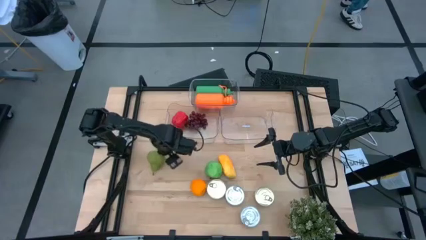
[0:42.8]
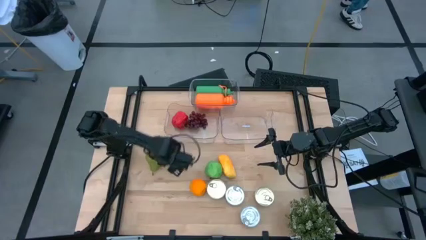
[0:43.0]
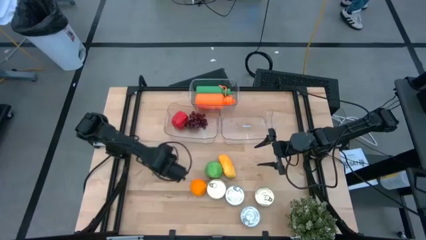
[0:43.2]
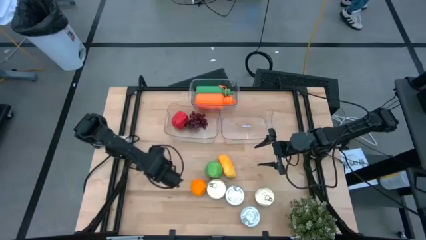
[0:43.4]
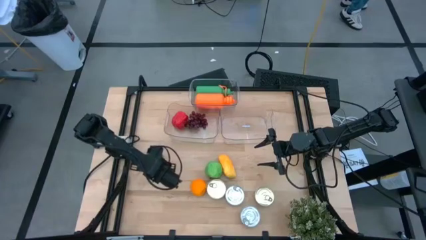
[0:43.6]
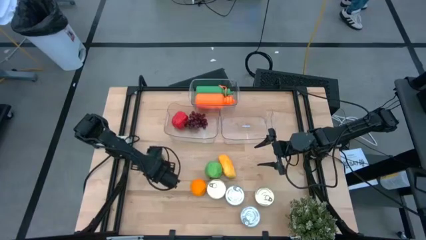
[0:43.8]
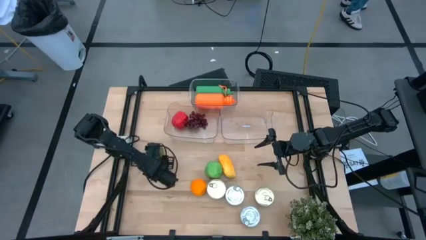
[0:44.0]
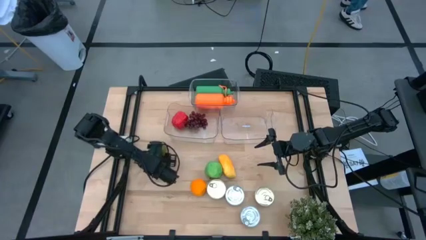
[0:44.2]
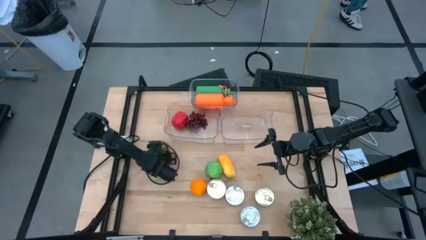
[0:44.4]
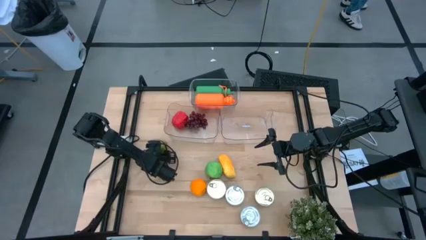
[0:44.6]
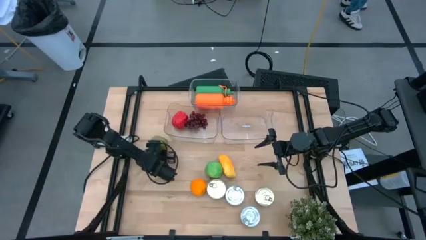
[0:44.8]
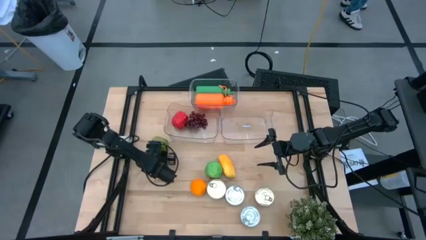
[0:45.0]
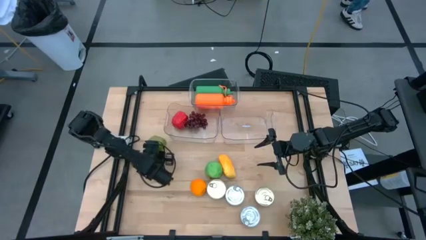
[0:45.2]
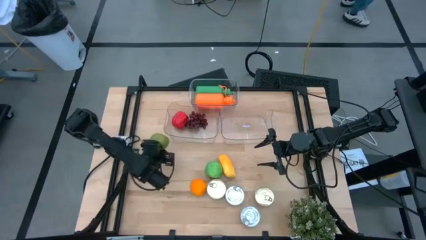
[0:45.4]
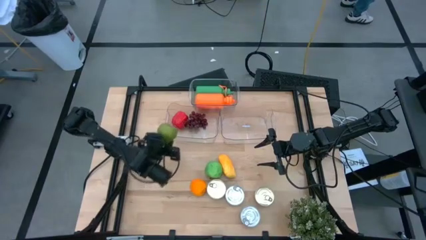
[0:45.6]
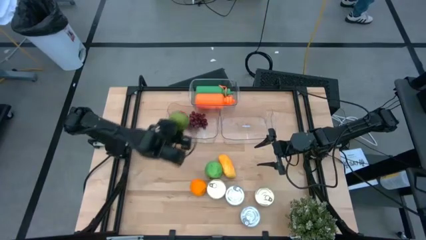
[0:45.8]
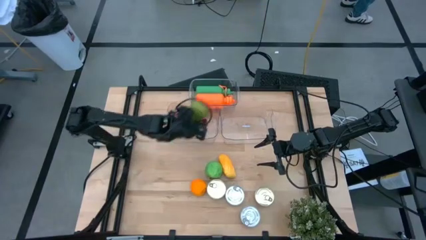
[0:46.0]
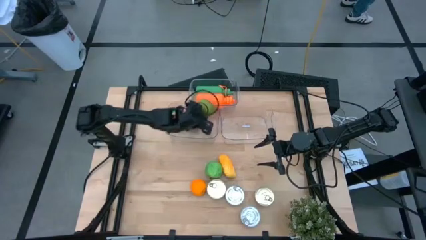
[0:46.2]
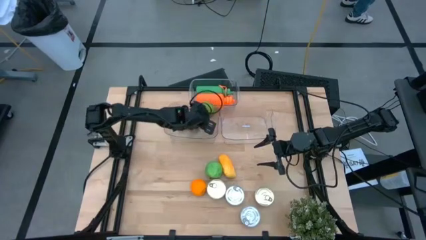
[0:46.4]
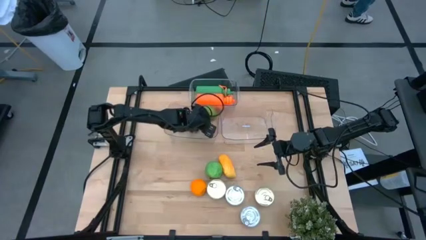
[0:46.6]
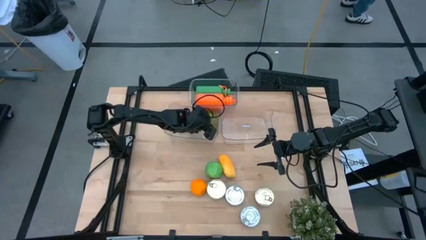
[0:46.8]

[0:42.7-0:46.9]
Task: Pick & Place Food Item
Put the green pear into the bottom left transparent bin

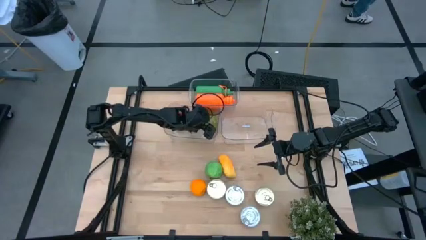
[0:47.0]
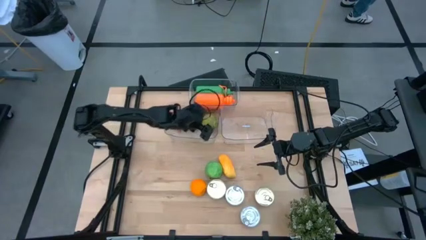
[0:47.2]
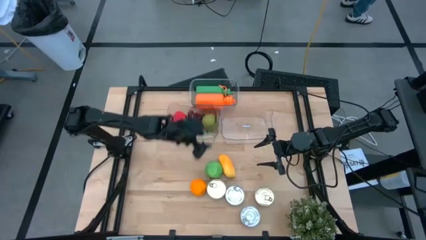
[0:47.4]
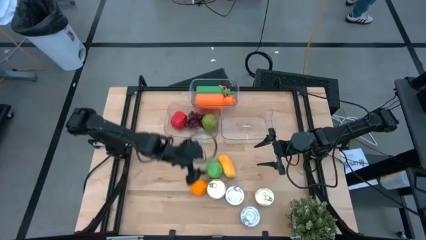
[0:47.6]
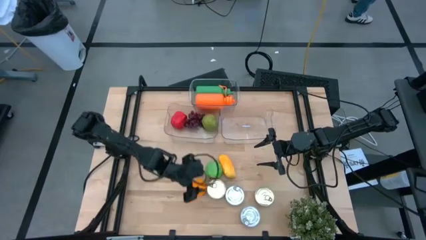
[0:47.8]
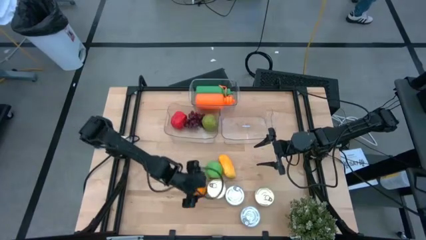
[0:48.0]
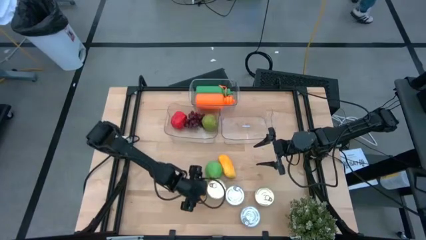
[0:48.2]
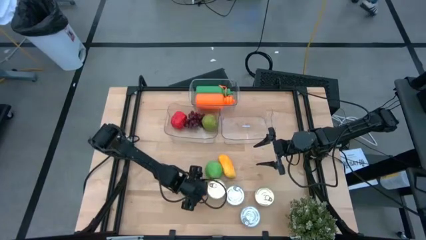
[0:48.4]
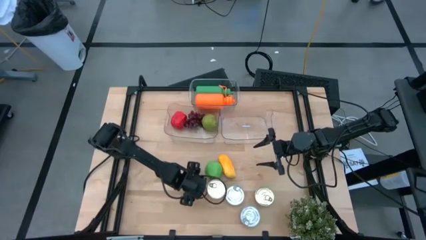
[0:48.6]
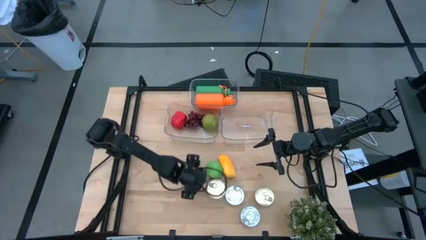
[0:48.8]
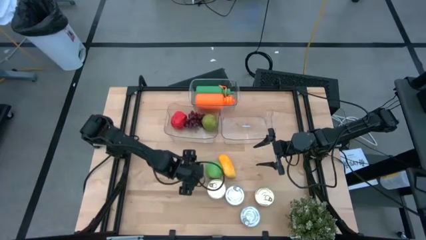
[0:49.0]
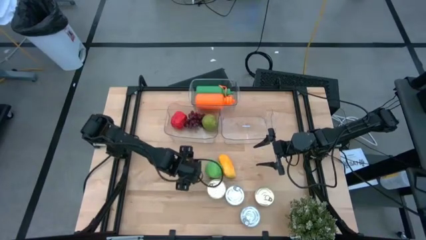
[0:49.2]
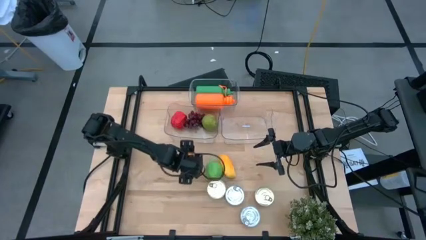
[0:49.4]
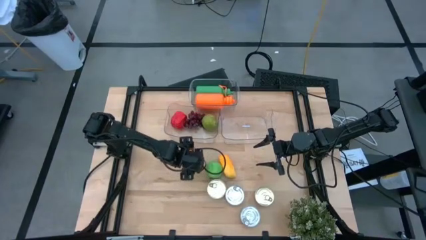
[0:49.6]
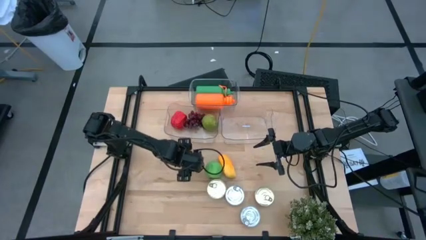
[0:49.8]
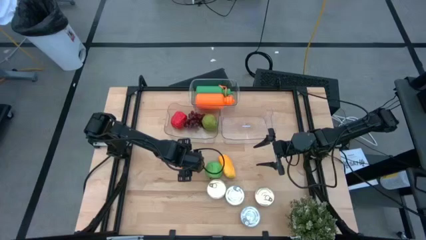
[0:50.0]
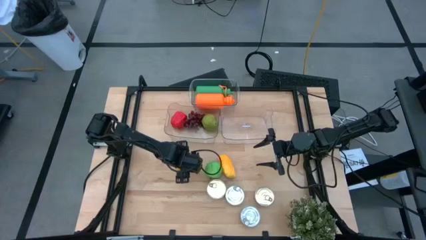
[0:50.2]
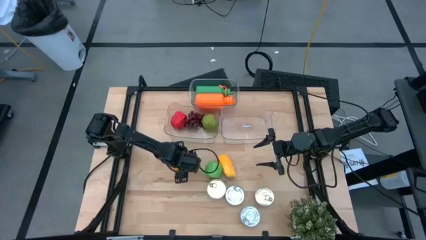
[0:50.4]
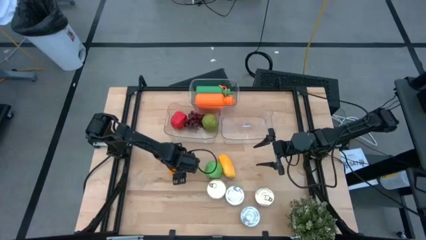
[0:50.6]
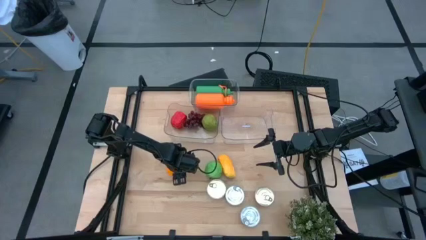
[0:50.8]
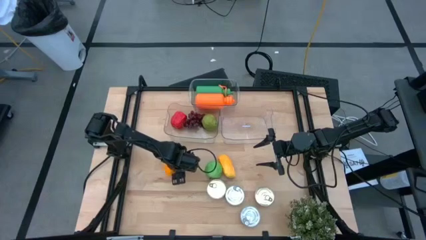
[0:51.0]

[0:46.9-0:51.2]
Put the orange into the bottom left transparent bin

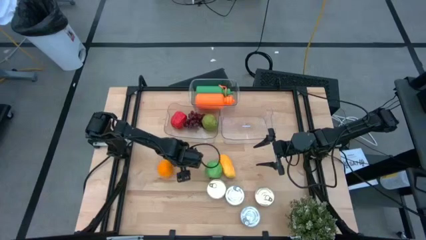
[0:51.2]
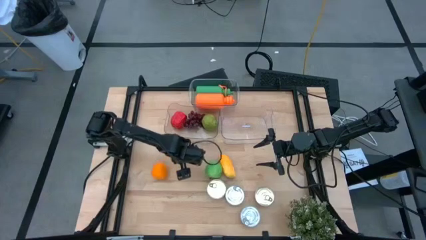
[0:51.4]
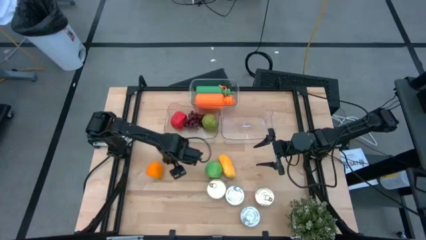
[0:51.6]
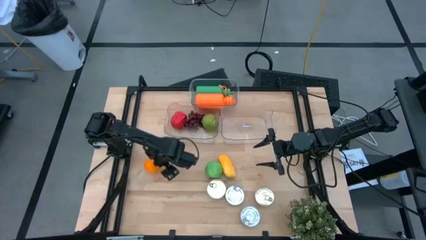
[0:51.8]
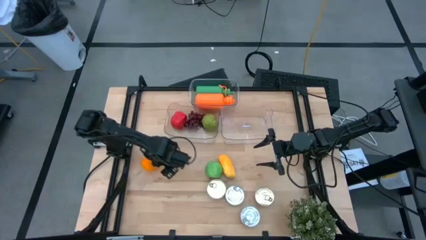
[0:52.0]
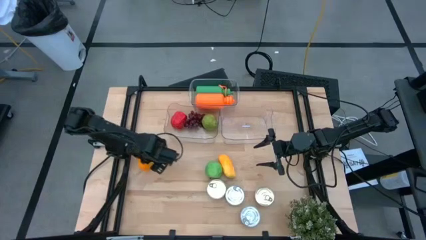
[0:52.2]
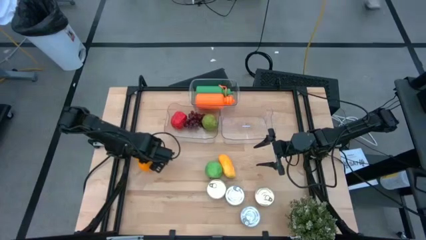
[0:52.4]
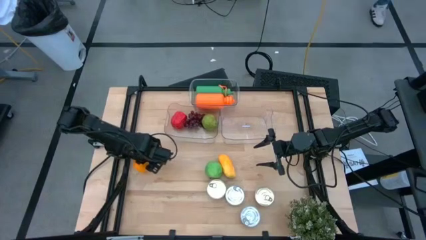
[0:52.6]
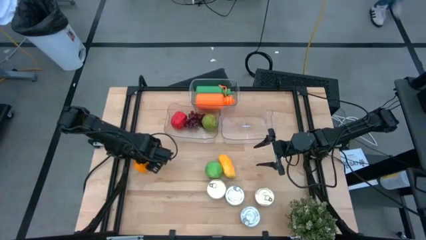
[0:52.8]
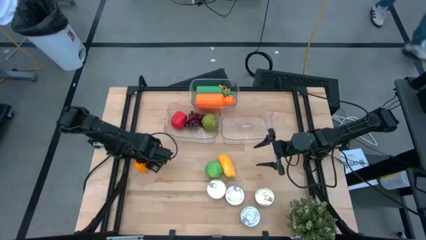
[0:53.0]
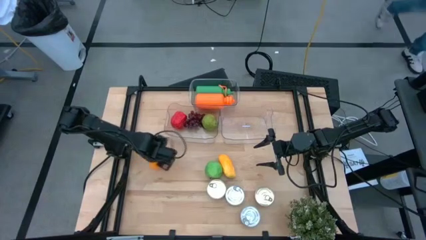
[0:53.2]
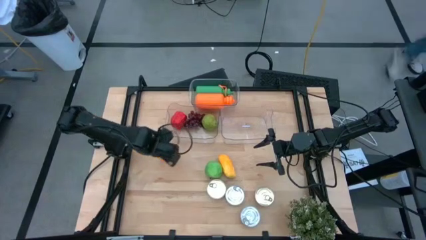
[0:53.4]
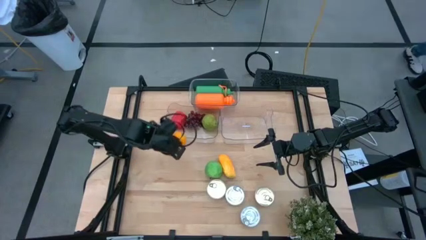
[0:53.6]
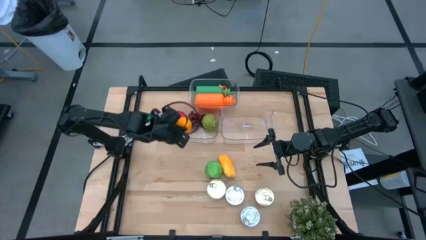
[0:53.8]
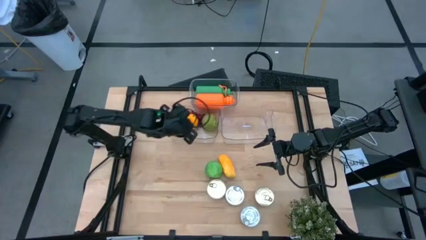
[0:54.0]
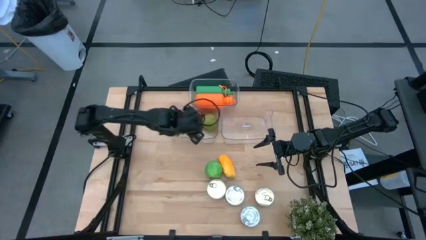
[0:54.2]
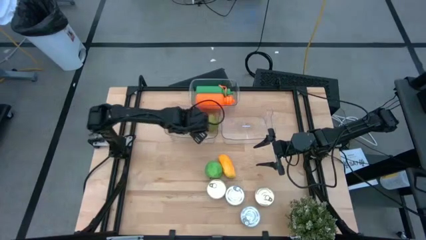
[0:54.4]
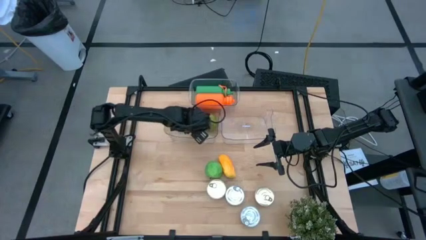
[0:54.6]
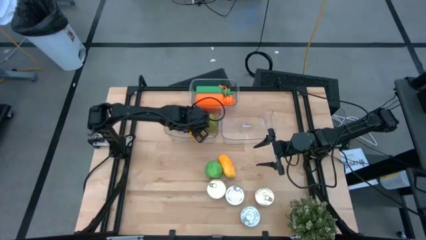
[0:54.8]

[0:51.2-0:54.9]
Put the tangerine into the bottom left transparent bin

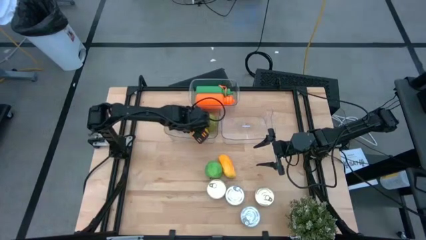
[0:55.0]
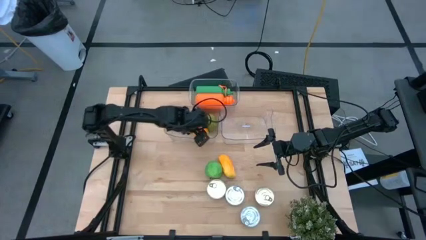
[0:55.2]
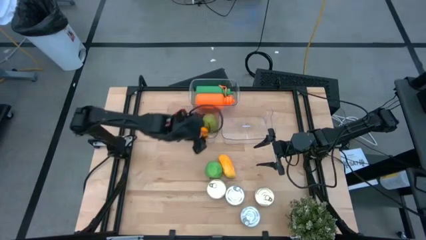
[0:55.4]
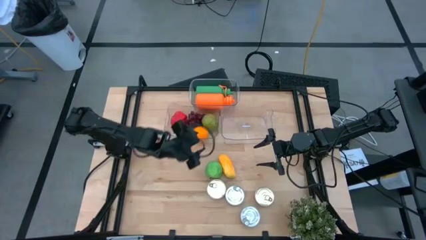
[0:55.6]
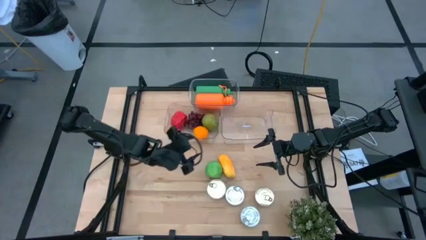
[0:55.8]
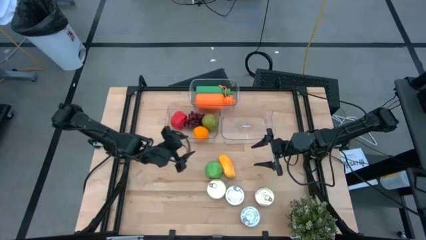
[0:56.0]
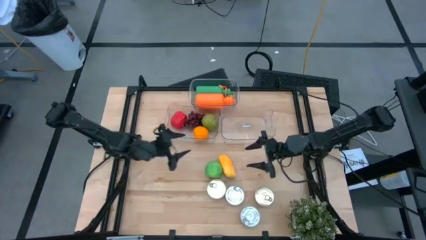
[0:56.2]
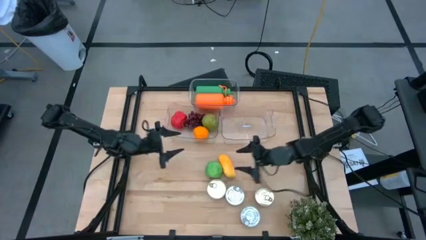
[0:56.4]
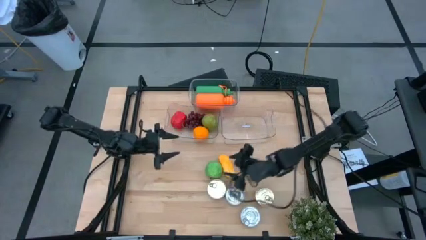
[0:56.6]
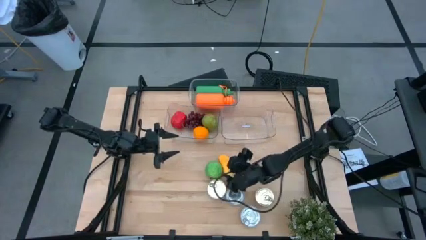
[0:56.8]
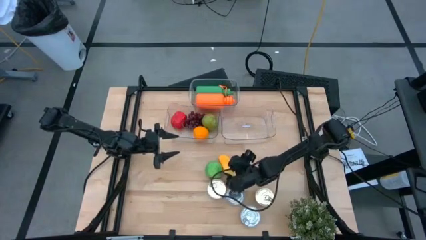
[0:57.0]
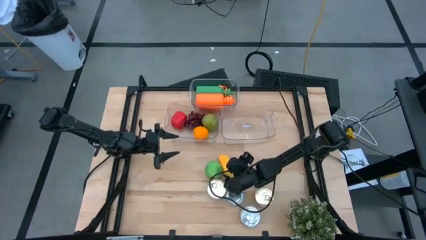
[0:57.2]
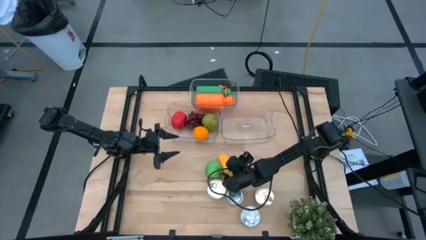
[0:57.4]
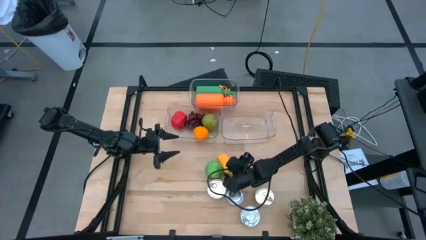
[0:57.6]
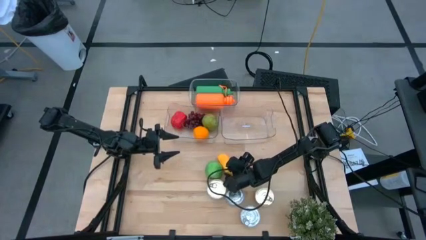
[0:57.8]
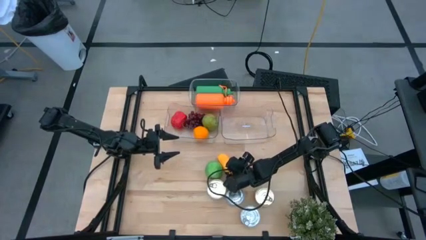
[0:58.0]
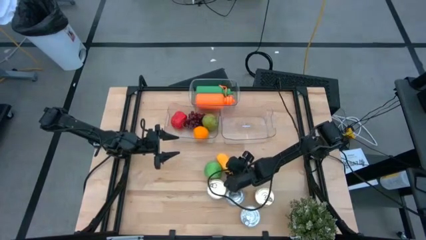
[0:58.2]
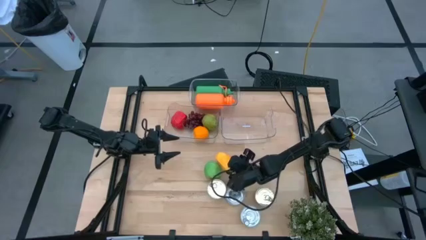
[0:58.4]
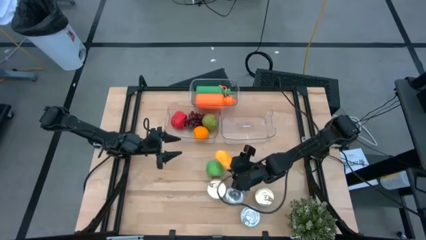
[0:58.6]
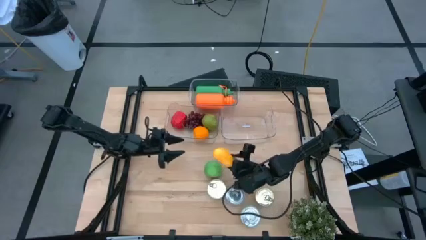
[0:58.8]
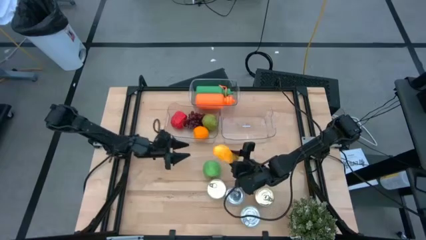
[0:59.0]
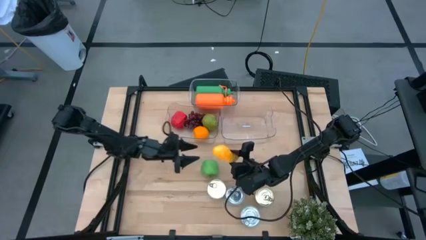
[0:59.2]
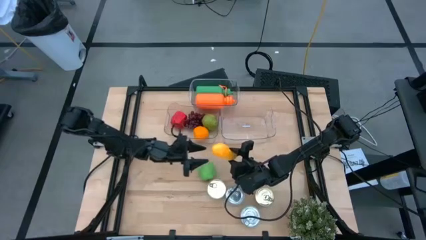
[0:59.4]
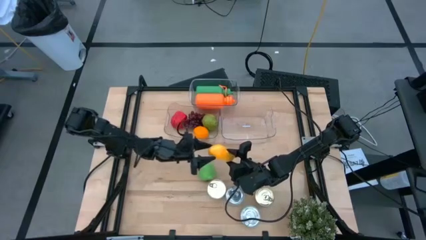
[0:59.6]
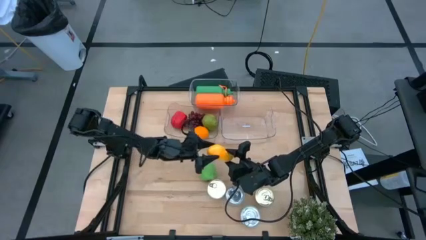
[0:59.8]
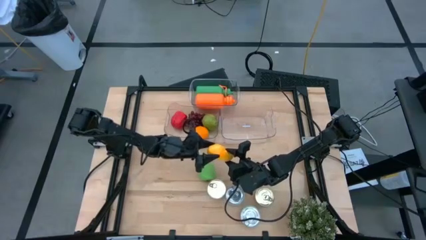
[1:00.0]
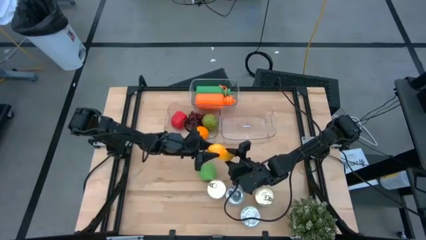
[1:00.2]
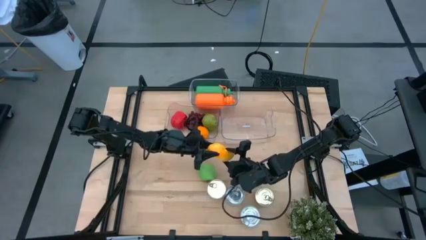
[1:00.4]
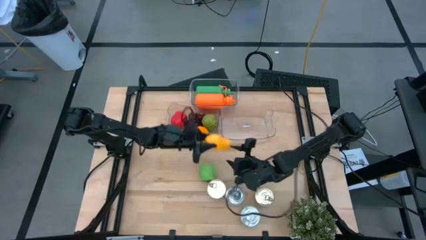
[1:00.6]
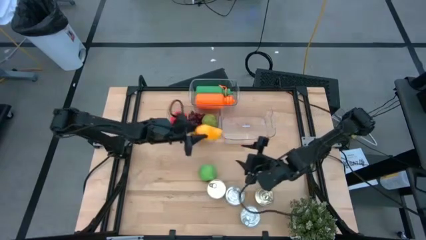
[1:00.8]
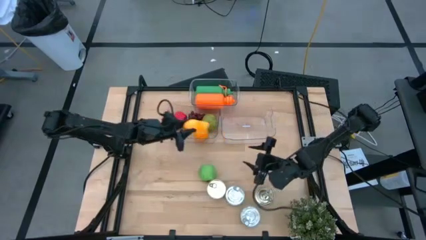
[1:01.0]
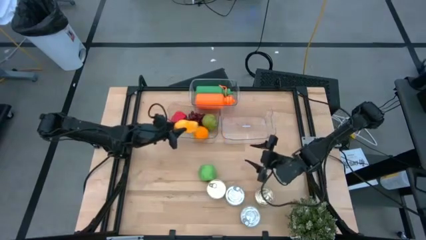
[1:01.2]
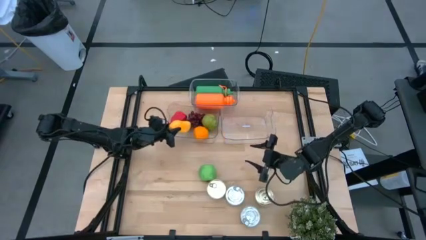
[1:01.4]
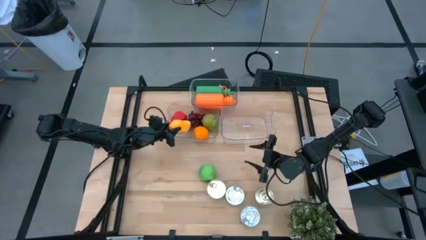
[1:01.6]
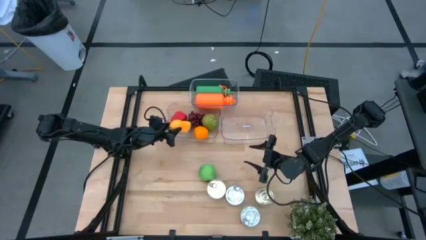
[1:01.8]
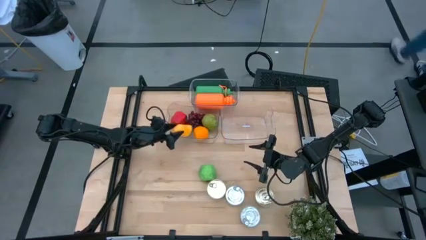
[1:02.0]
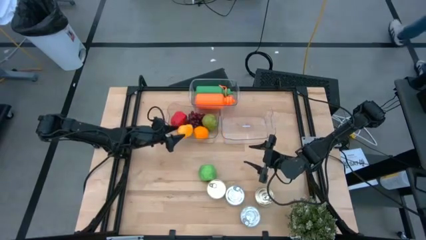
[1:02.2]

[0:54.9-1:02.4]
Put the yellow mango into the bottom left transparent bin
